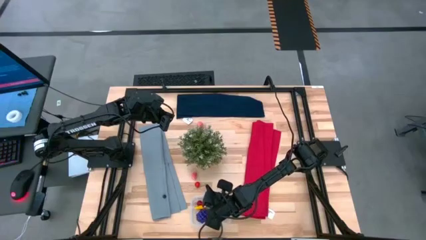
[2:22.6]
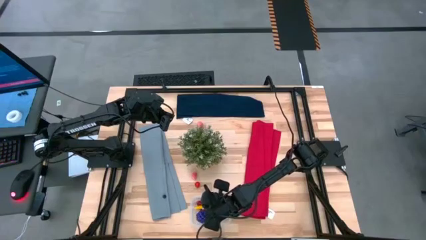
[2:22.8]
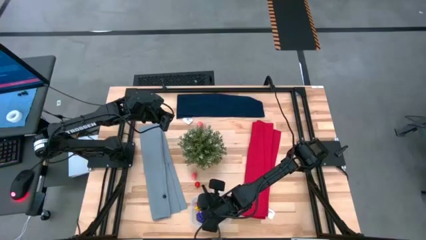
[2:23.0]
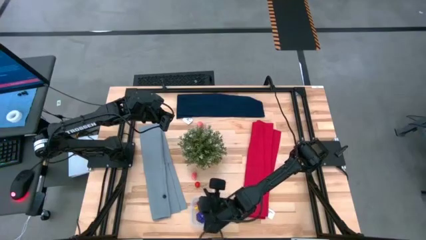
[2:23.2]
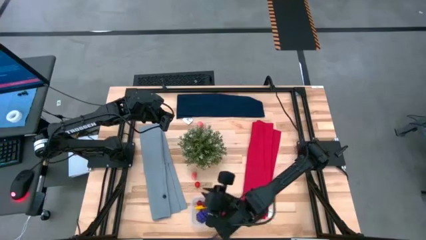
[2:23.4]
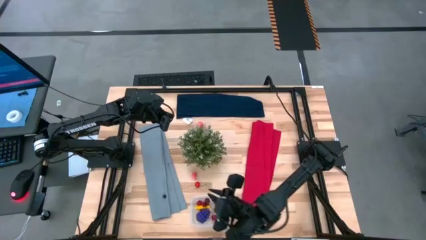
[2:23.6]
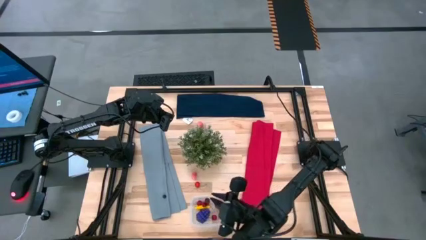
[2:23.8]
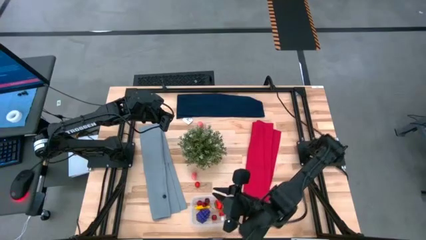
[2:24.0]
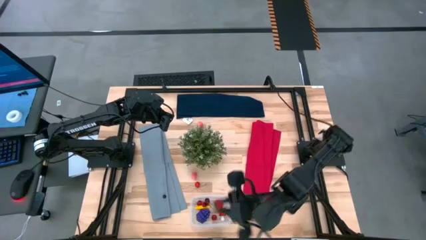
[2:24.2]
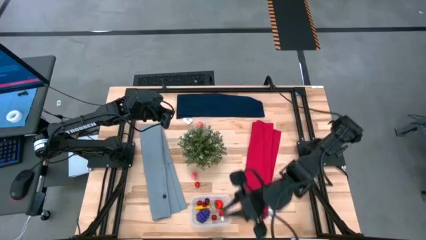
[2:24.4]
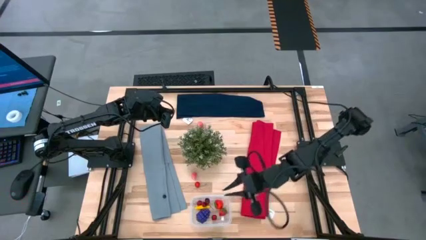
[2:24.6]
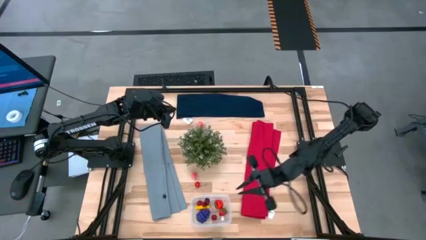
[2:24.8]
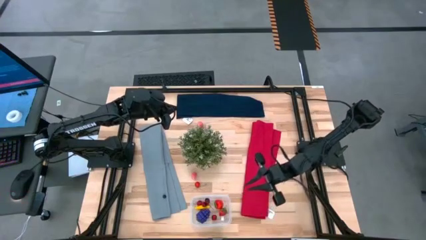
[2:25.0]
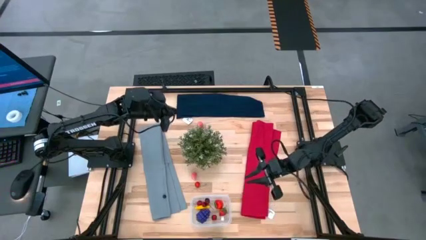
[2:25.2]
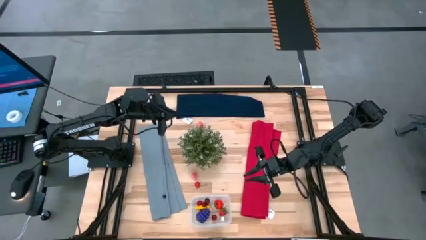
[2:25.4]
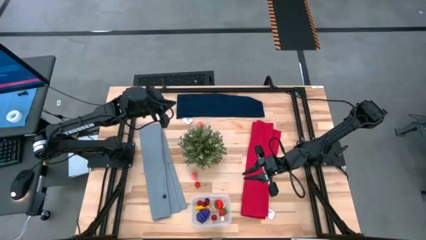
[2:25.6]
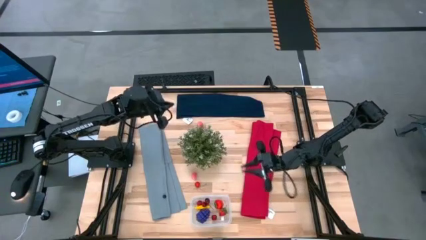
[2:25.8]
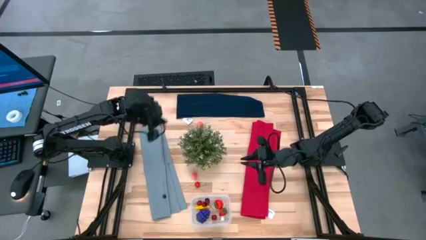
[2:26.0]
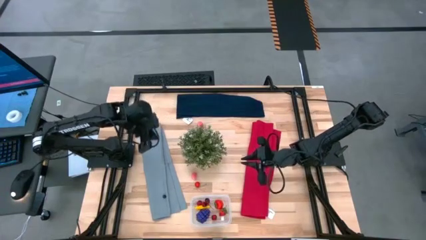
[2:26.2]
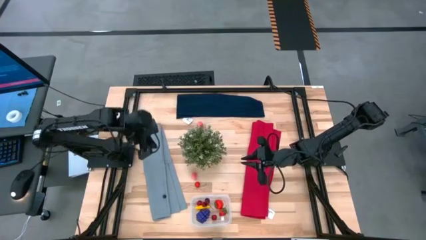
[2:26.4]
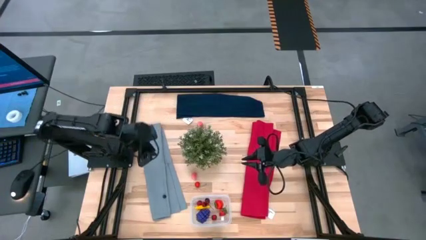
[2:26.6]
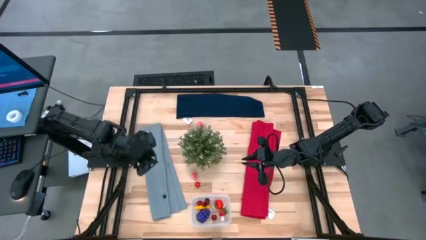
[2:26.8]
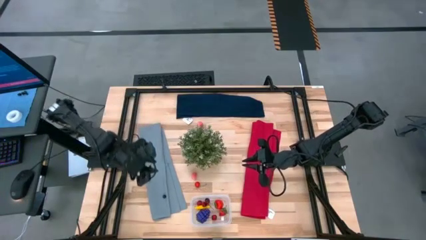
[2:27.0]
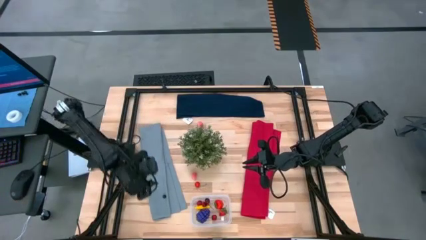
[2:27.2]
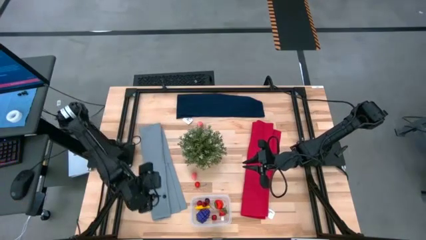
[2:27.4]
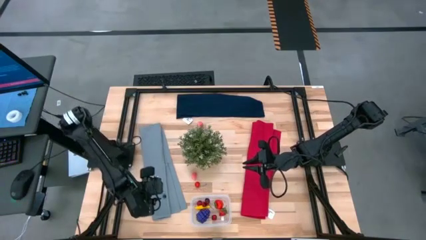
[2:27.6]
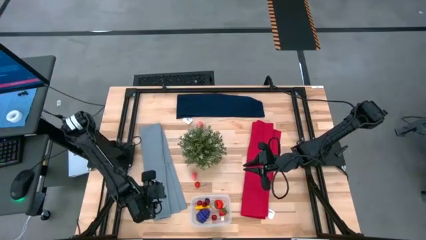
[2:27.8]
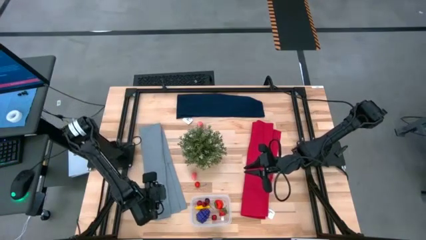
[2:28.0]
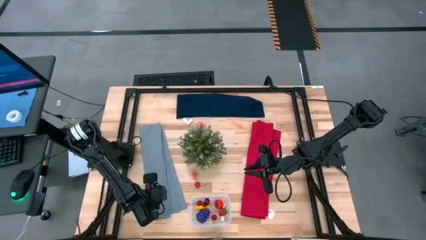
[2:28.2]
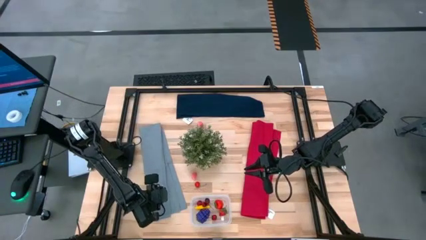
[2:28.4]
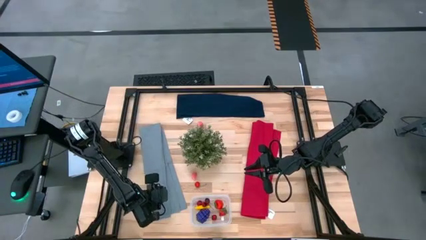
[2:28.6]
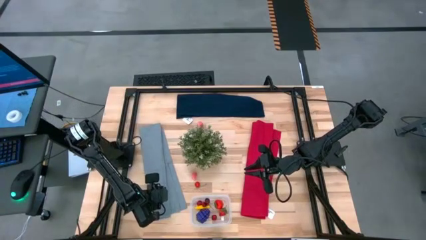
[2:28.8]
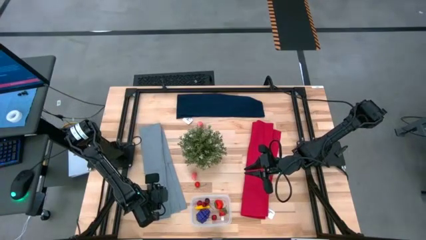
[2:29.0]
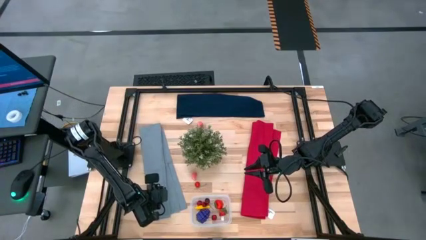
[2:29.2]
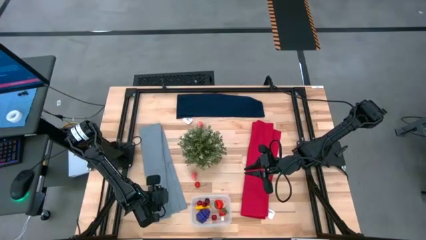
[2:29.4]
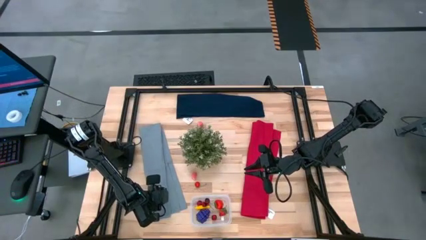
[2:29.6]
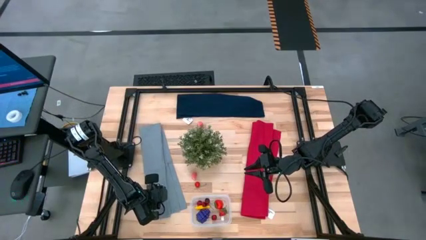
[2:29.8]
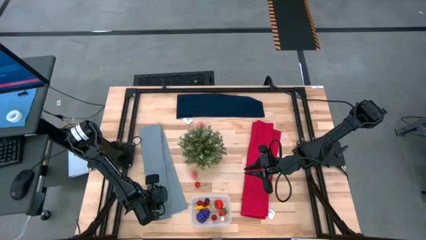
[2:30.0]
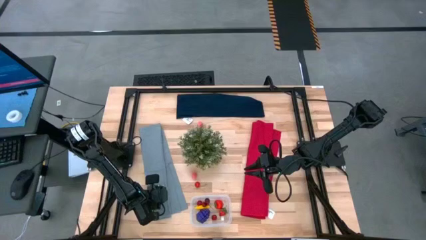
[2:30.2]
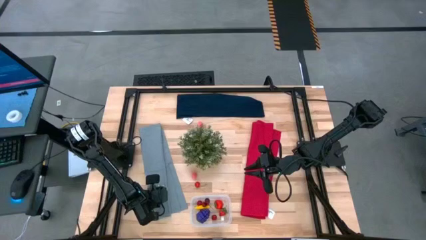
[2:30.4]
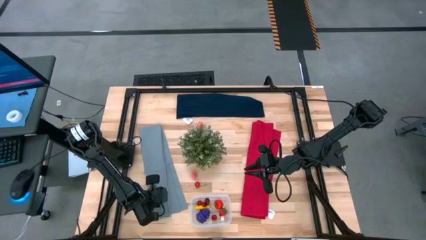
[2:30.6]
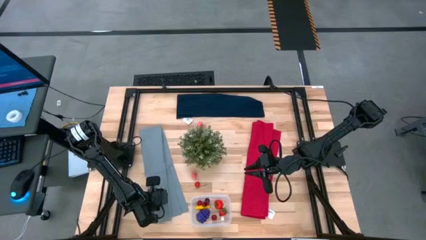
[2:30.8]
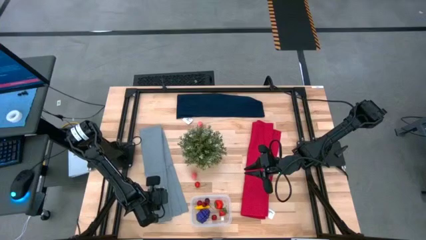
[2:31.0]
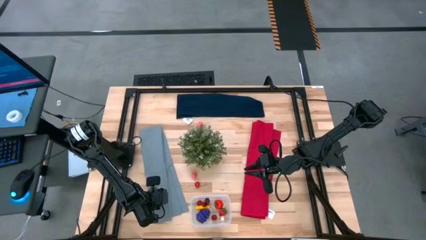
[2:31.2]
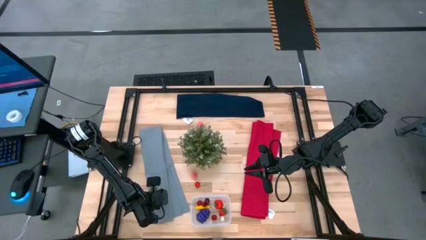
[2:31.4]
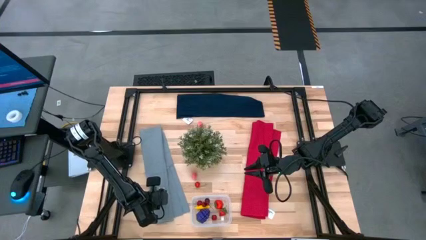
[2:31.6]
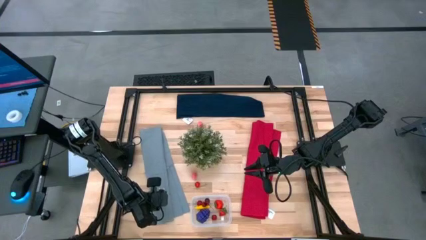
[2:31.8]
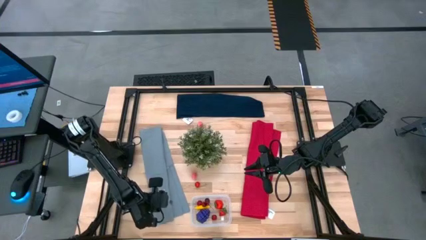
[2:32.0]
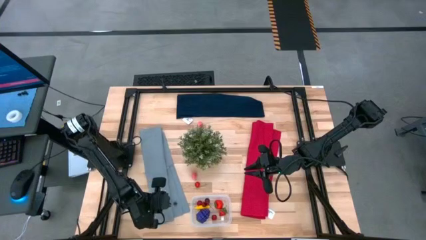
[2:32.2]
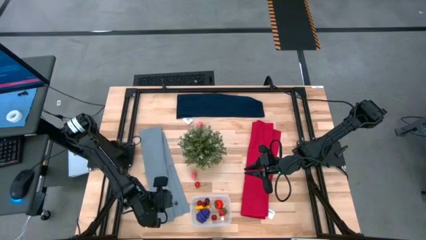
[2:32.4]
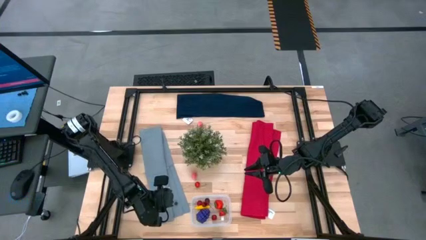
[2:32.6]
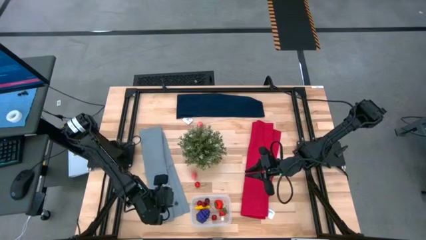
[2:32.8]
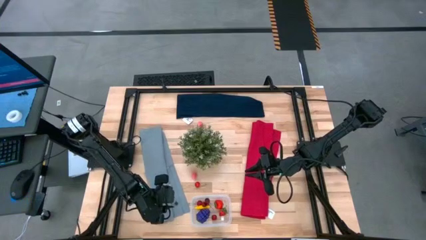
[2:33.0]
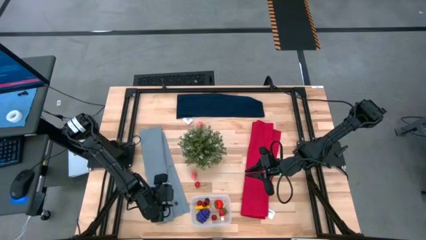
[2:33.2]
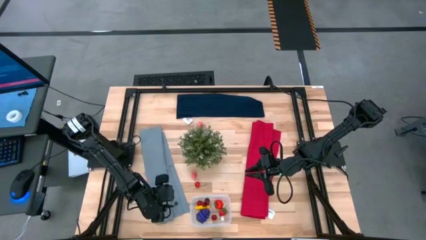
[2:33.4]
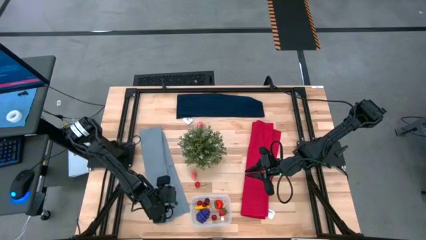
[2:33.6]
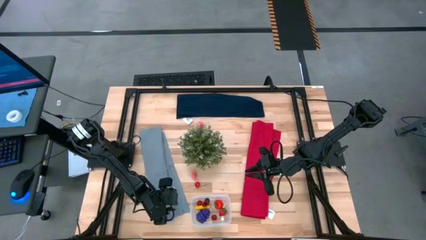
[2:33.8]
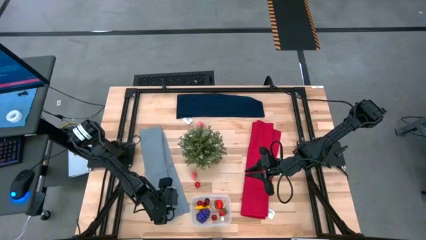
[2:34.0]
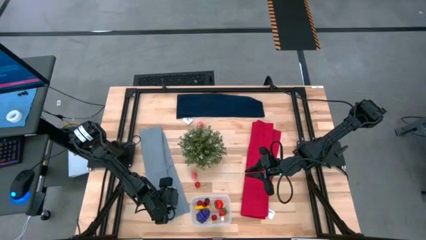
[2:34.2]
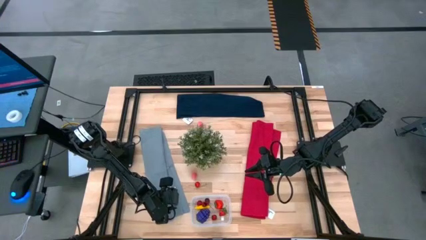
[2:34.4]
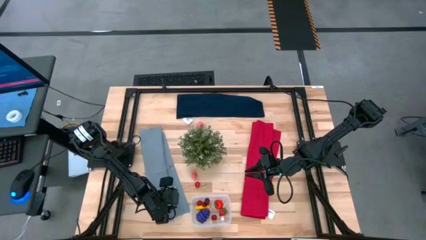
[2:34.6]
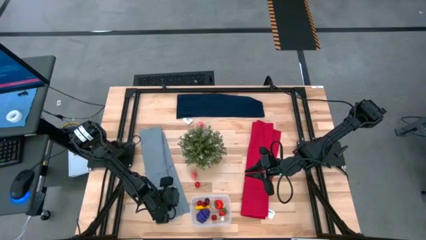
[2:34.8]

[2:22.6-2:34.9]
Task: Pick and placing Produce into tupperware
Put the blueberry into the transparent container

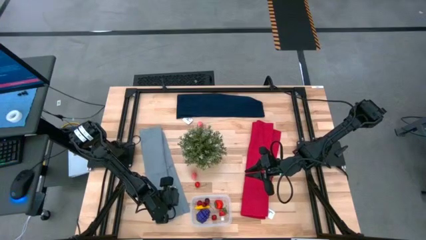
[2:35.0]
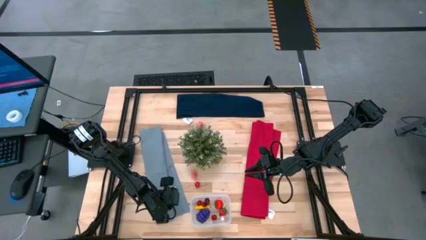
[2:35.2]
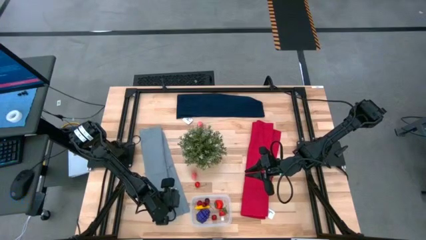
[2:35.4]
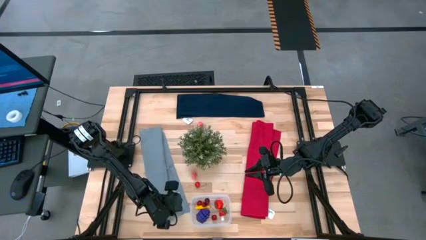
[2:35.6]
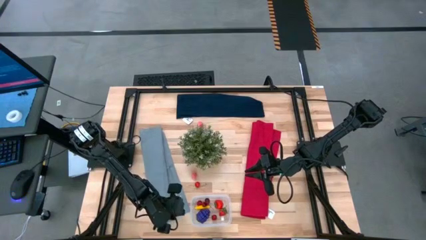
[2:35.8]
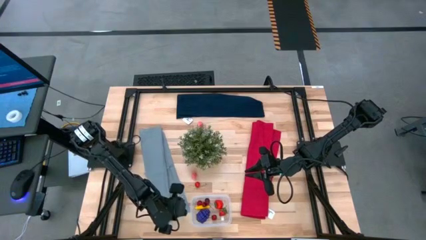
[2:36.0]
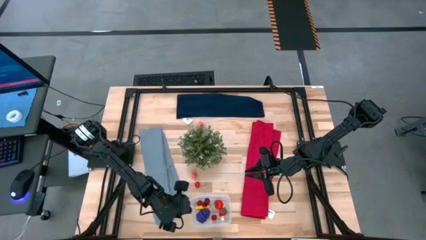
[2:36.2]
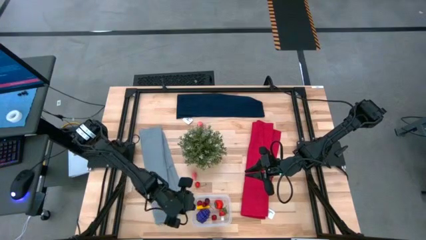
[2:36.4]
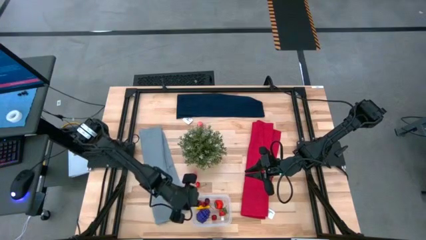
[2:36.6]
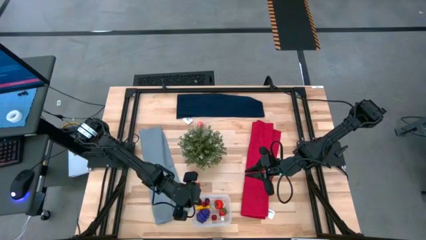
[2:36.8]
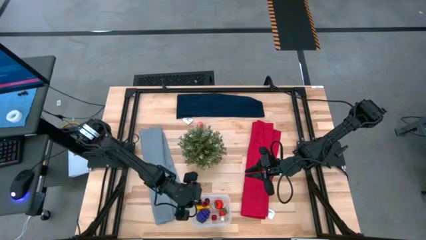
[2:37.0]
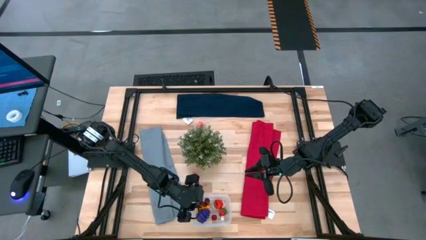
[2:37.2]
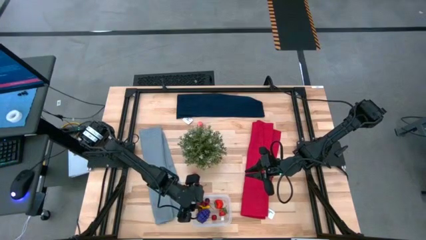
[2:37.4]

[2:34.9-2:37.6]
Put the blueberry into the transparent container
